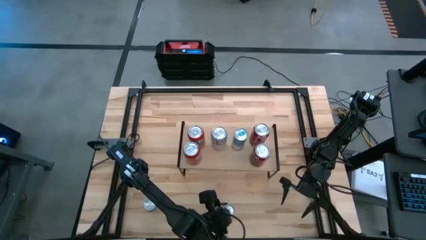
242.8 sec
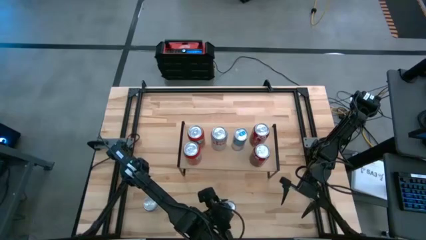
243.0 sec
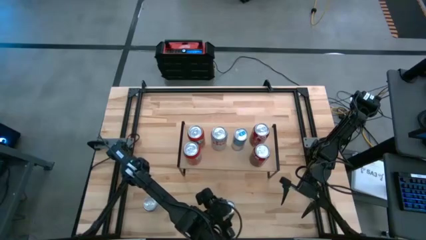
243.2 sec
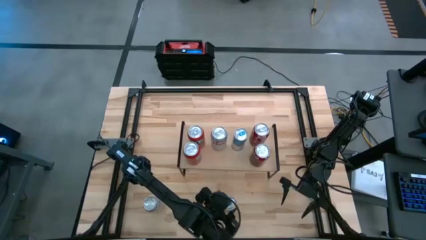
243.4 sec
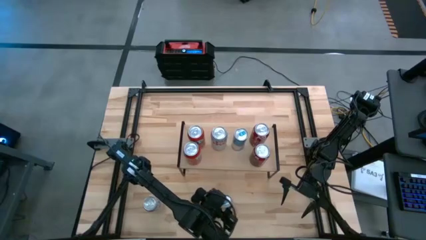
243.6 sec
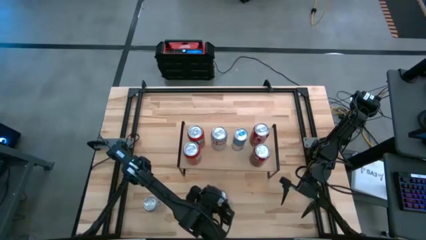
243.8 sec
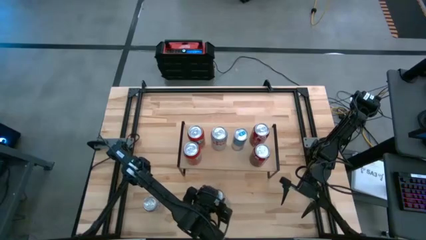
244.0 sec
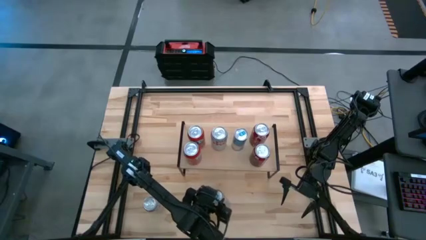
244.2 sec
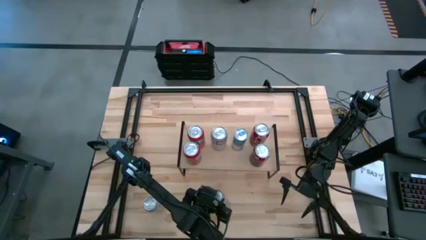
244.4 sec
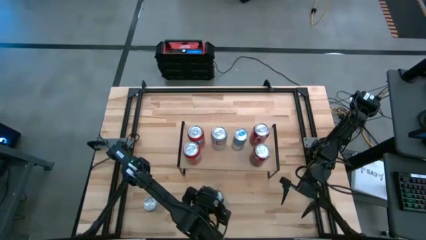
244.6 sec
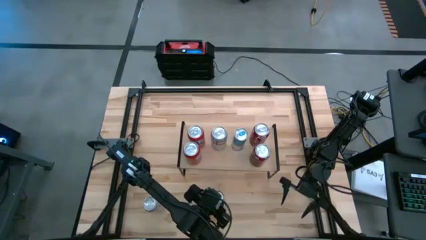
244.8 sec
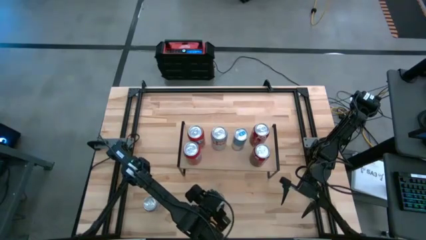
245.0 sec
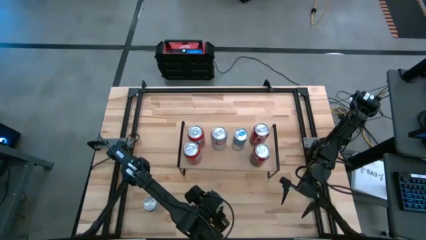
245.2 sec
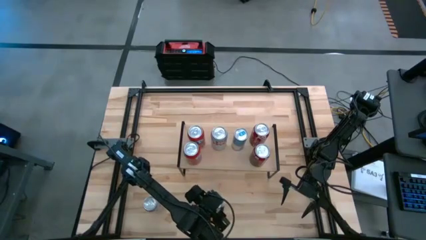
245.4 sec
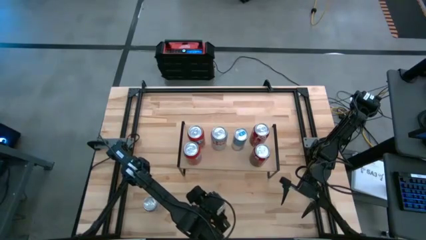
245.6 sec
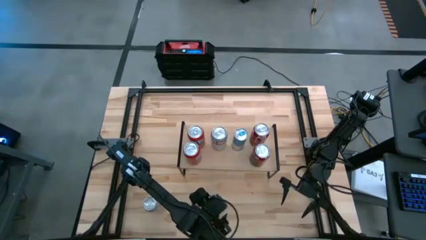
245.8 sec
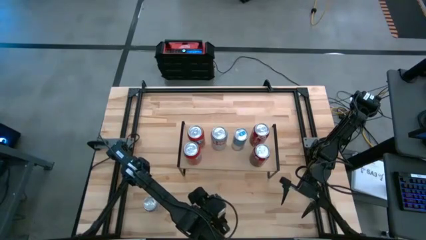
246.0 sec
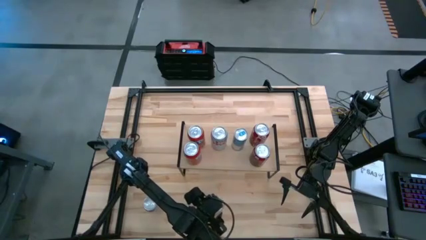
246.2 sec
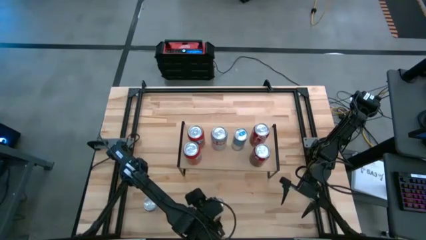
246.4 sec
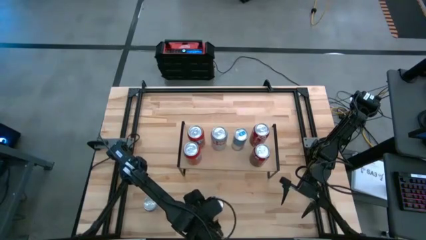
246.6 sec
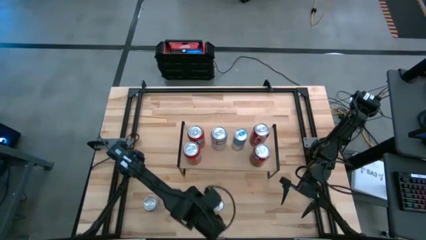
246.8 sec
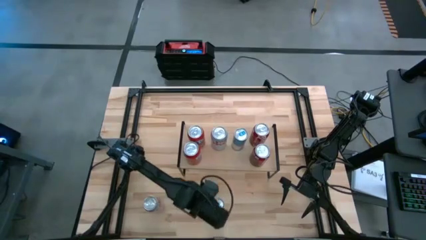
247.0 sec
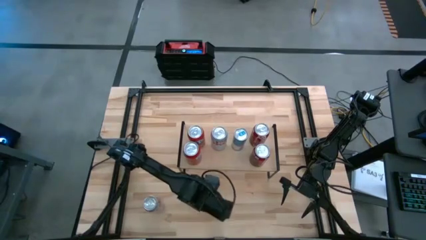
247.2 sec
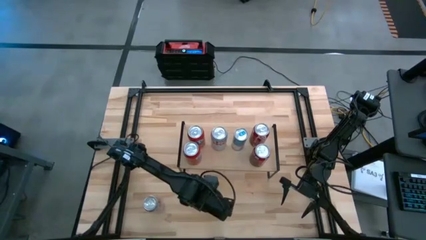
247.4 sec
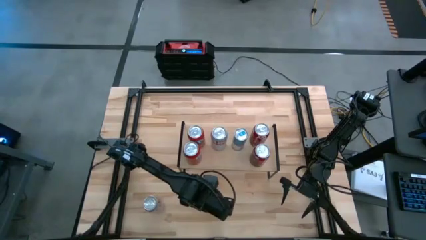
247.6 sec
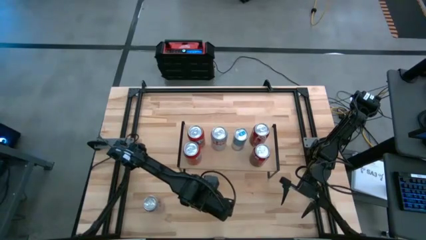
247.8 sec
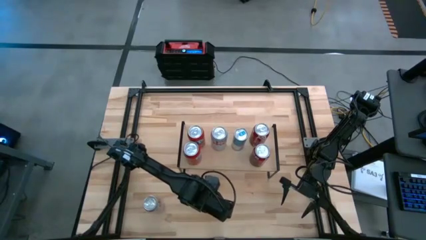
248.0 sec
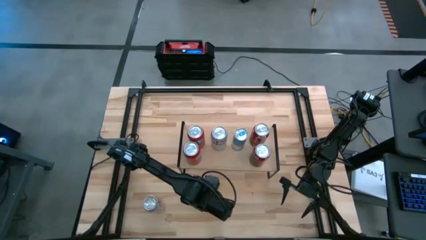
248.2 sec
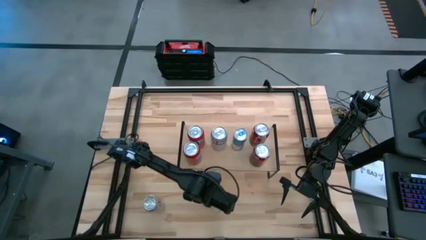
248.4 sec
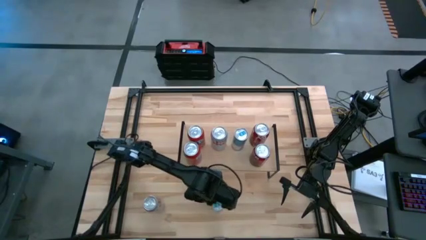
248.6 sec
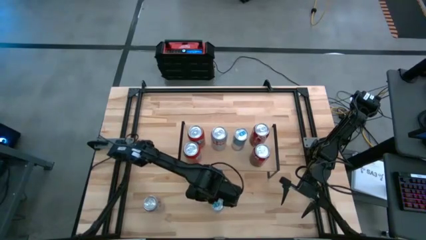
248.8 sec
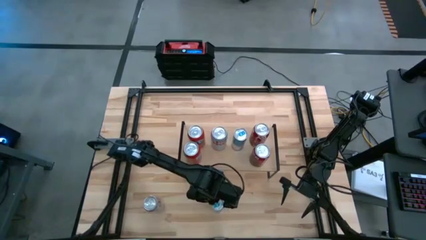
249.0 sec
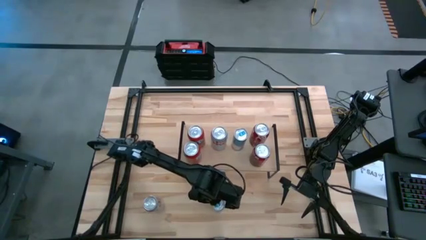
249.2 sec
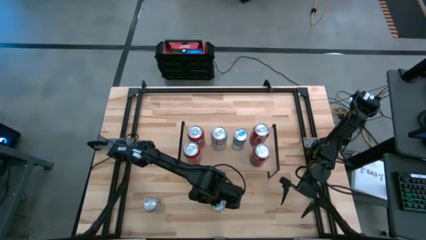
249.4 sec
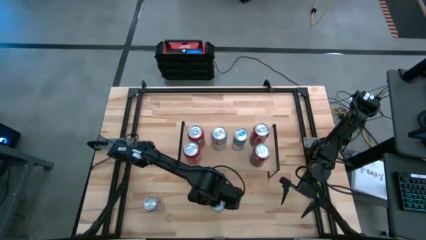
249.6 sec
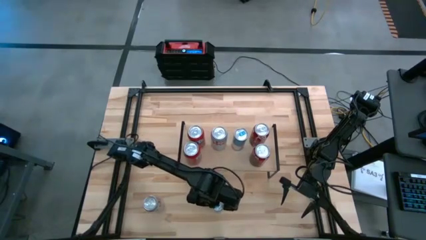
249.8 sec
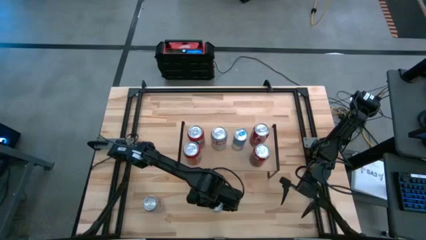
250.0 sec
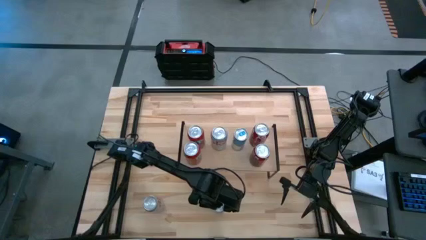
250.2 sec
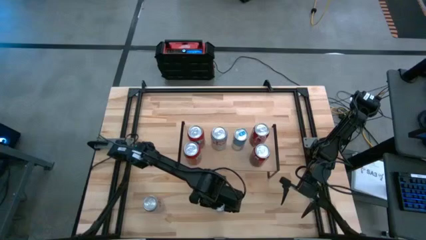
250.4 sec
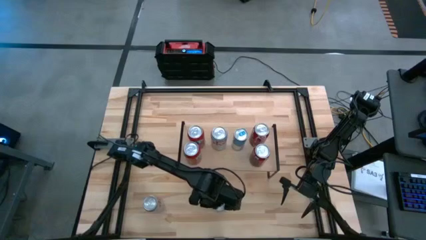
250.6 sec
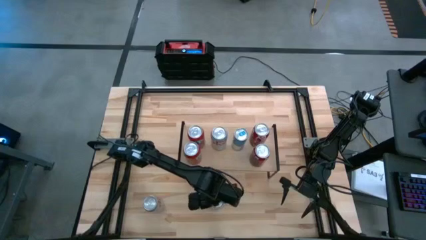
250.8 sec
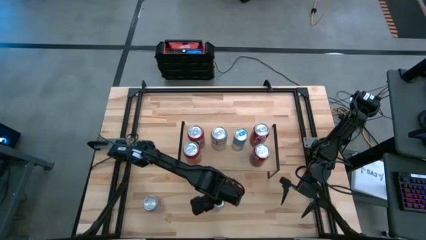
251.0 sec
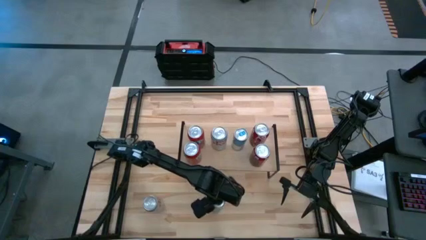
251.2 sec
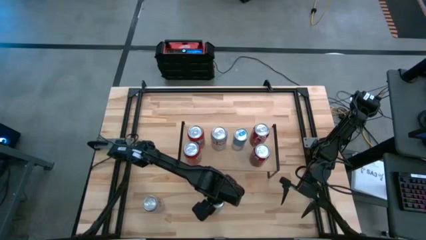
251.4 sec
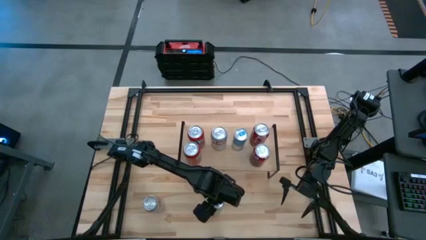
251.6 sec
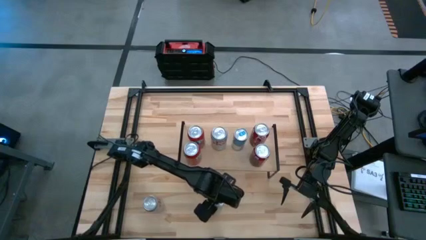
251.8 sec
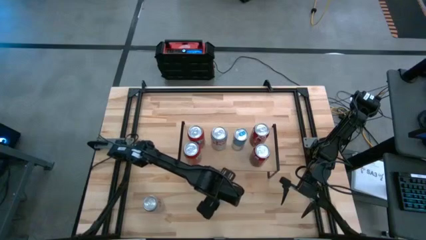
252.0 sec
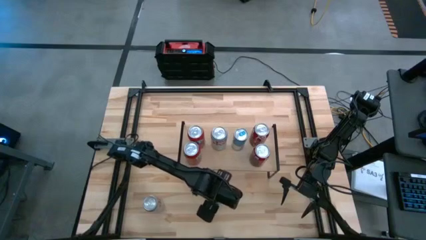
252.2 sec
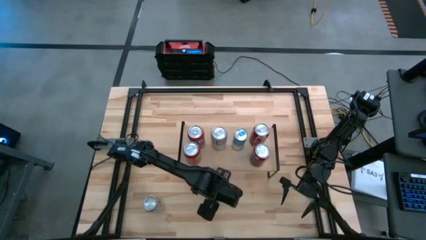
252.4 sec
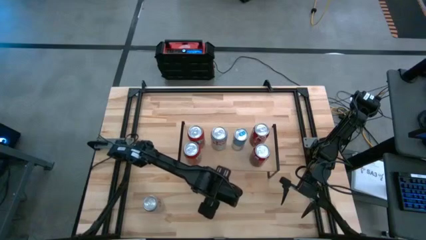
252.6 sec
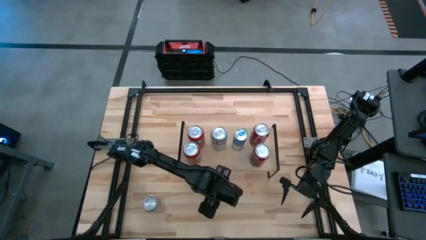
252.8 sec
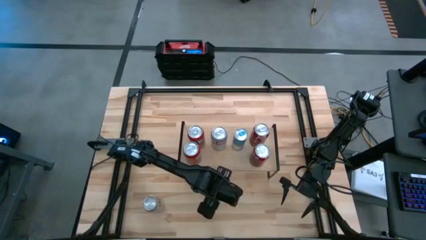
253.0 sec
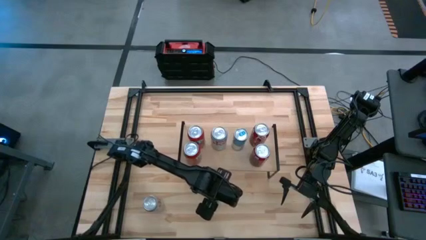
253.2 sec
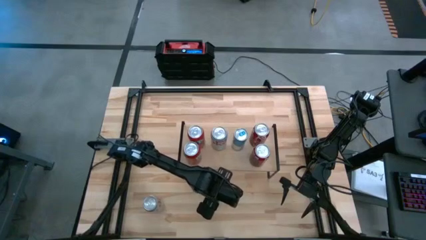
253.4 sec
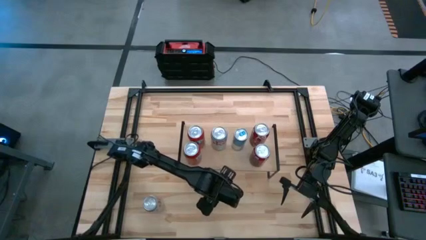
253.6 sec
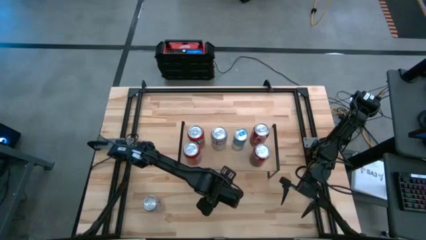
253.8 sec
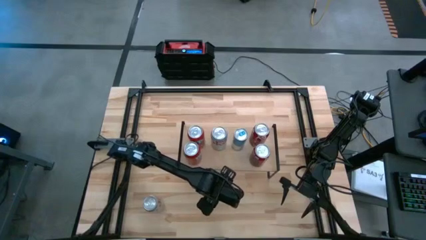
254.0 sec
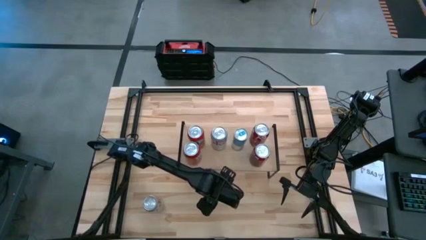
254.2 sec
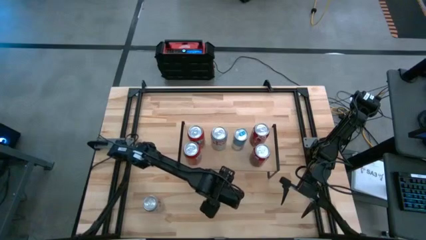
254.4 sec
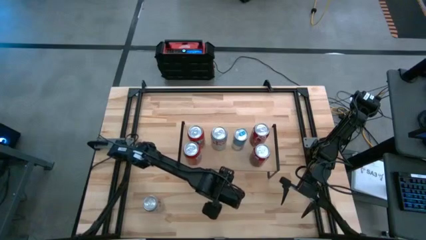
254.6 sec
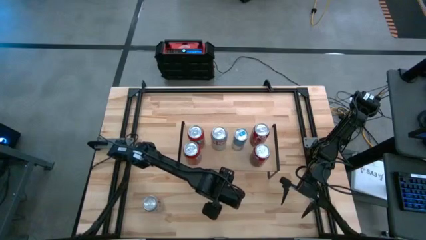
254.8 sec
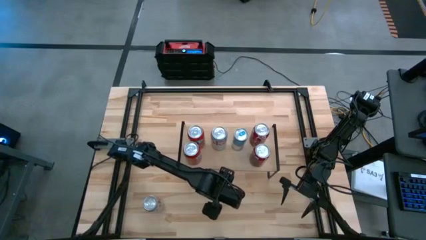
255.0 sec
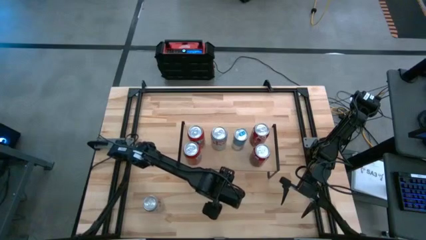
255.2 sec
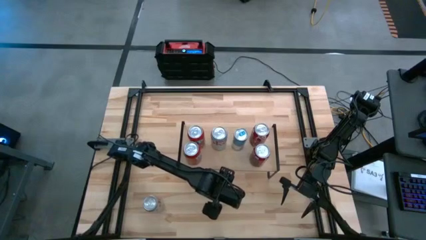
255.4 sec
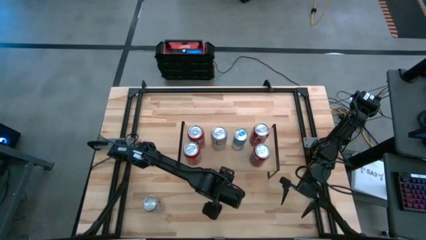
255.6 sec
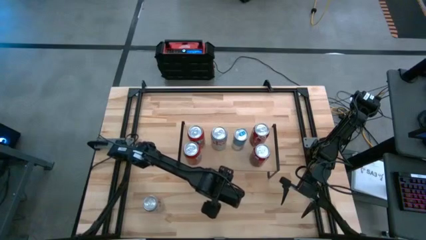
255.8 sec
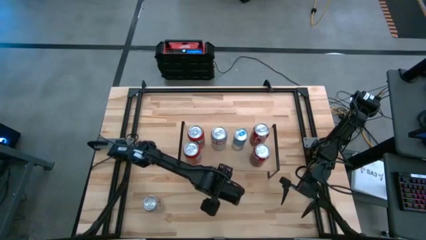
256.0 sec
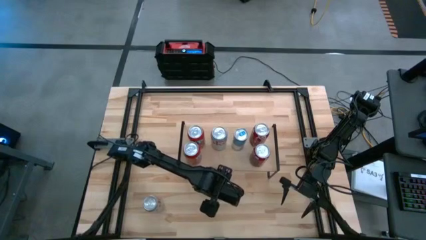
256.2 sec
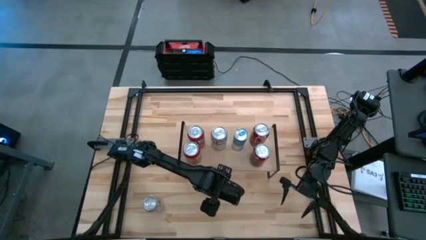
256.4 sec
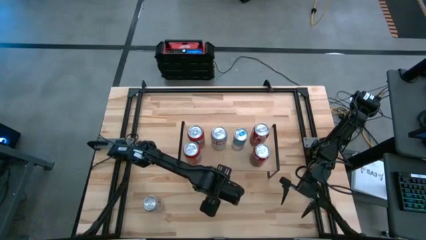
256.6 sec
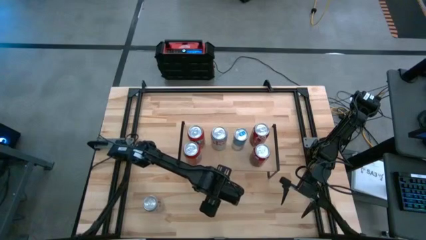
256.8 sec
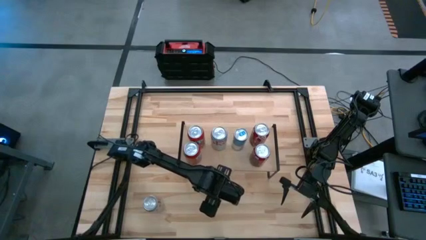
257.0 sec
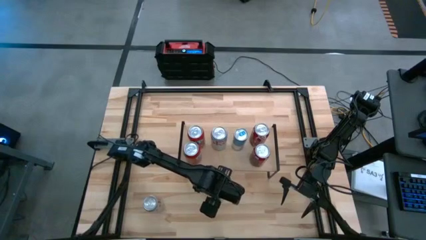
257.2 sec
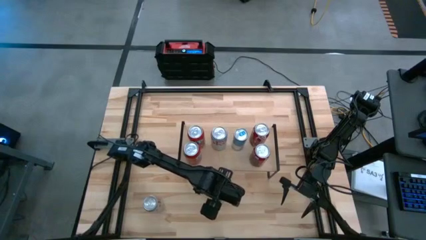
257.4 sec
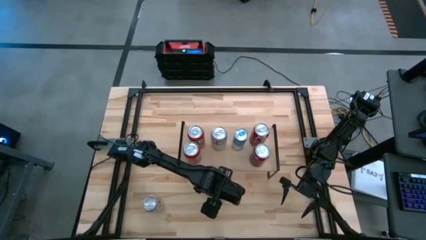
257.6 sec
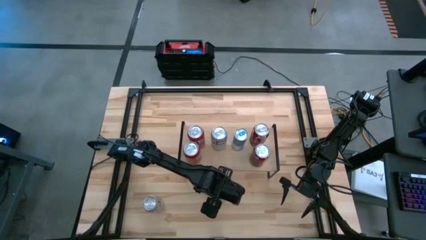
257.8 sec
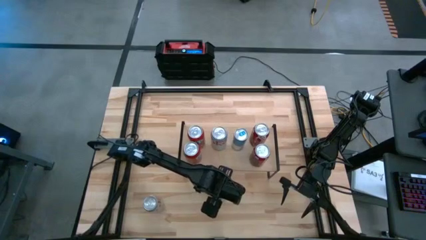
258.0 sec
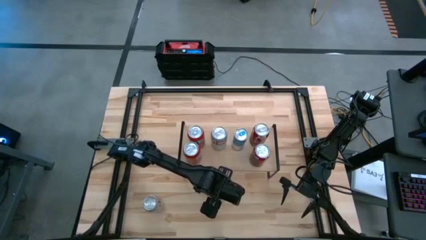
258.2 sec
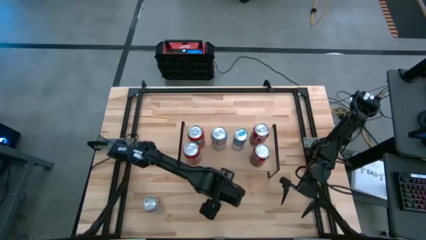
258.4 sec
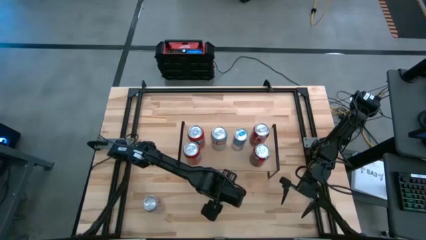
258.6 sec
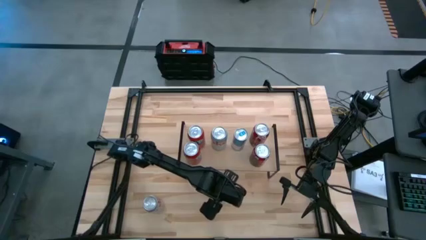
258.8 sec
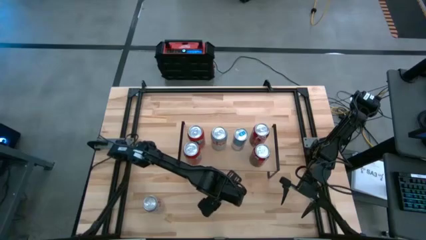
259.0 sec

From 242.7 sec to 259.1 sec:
Task: Place canned beverage on shelf
Put the blue soda can on the shelf
